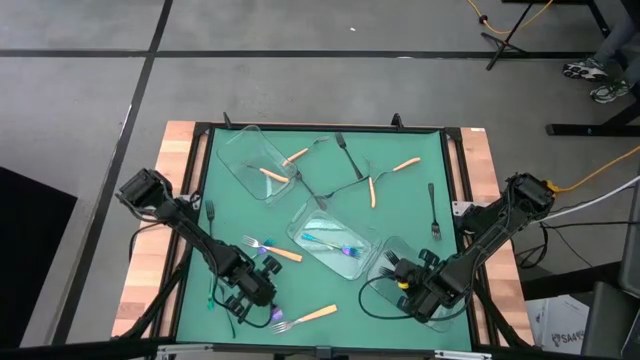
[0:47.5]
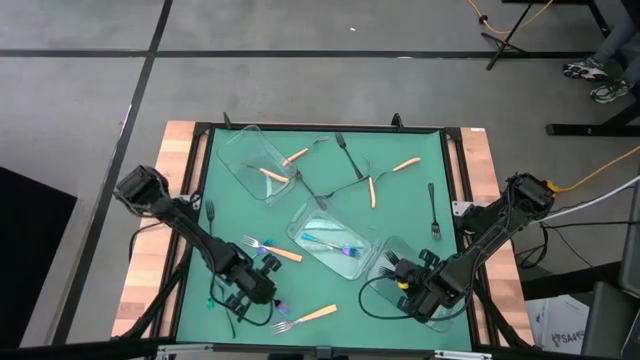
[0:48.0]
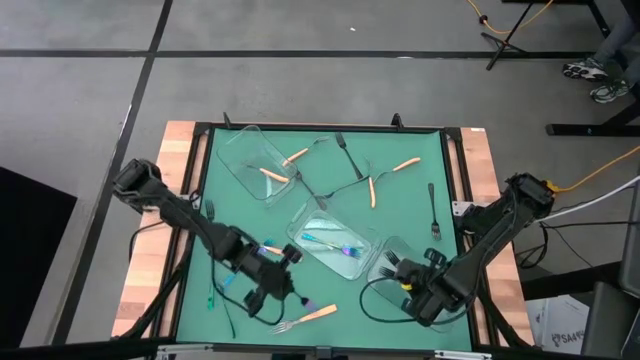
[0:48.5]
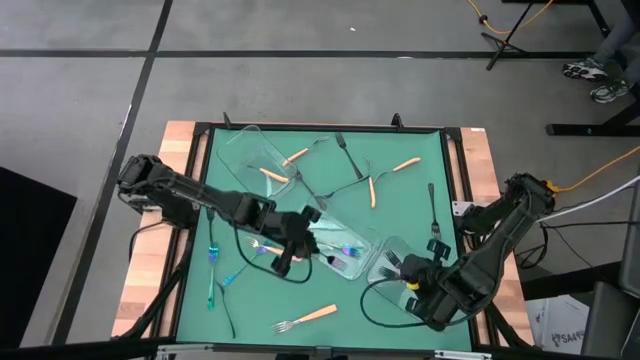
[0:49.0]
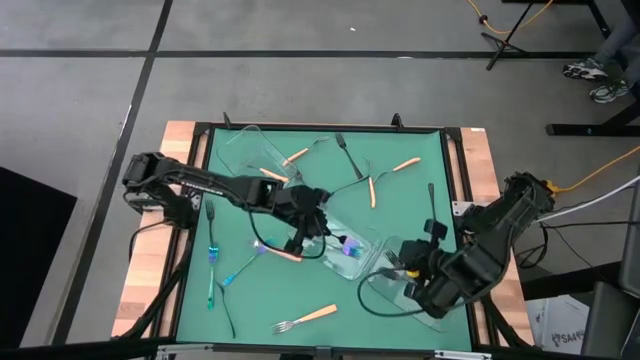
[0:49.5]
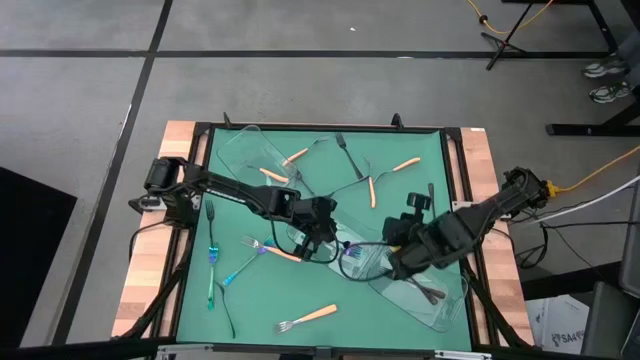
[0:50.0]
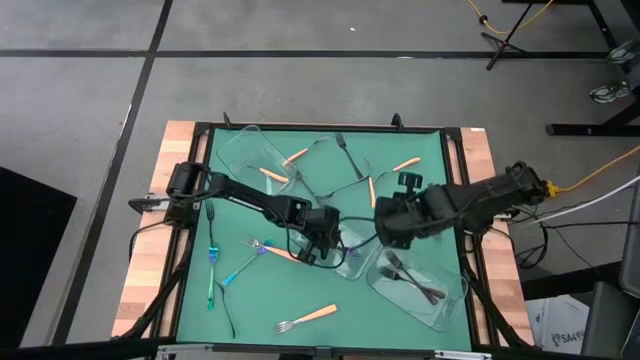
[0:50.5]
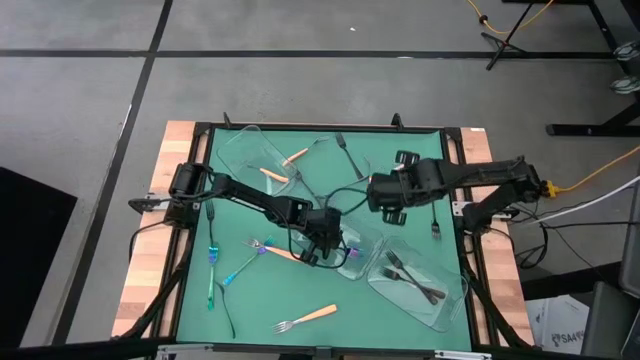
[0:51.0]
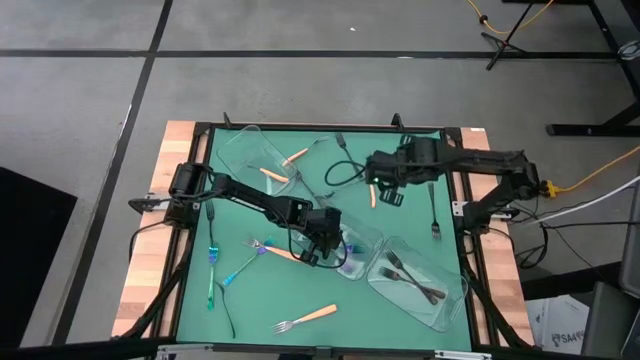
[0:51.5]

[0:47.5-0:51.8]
Task: Sort silverware by color (type)
Put the blue fork into the center transparent bin

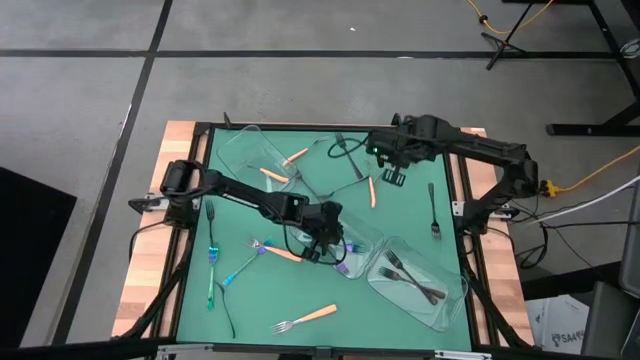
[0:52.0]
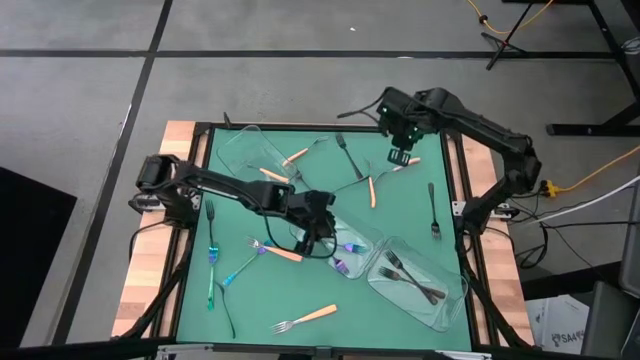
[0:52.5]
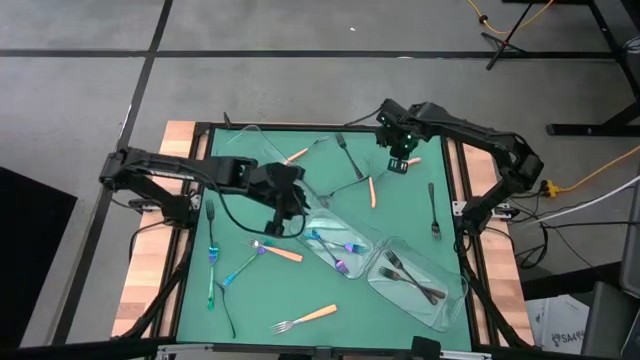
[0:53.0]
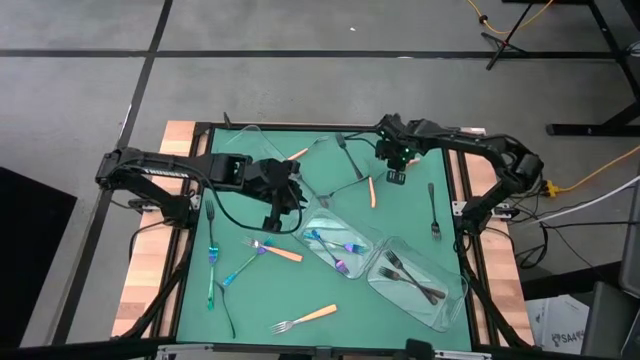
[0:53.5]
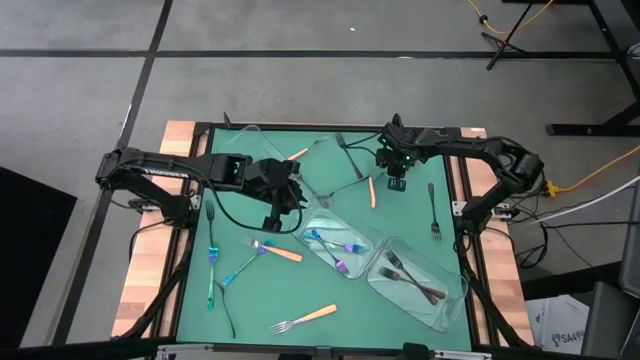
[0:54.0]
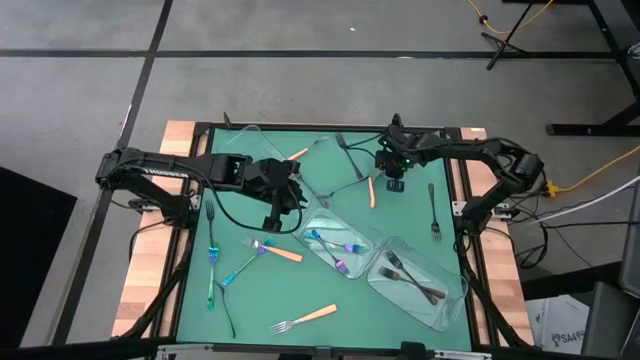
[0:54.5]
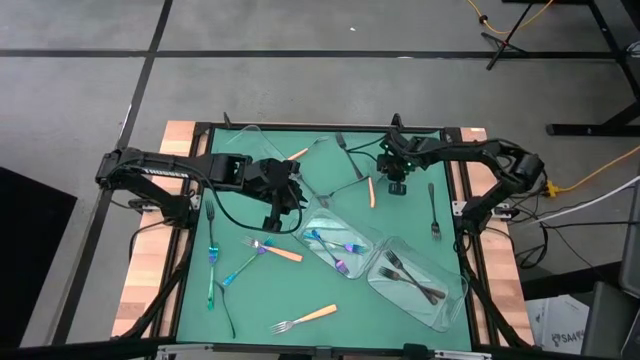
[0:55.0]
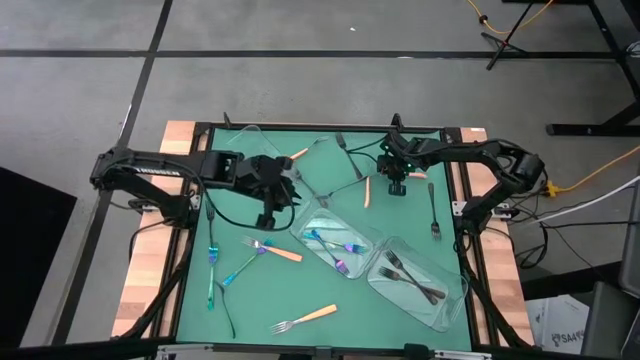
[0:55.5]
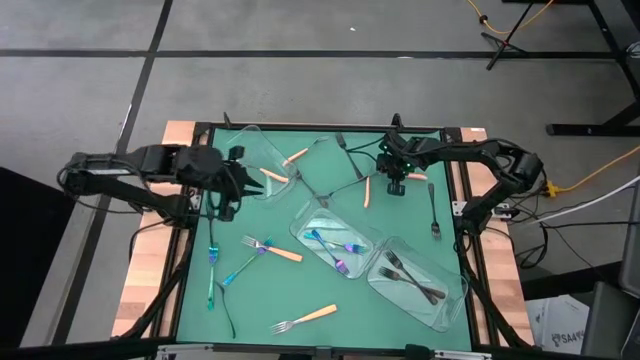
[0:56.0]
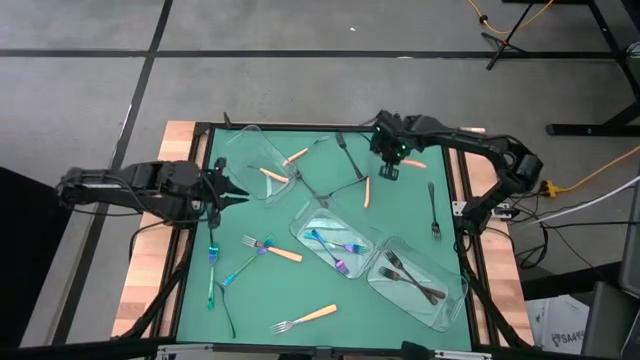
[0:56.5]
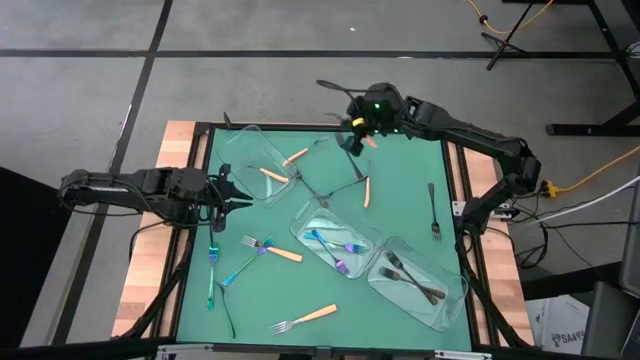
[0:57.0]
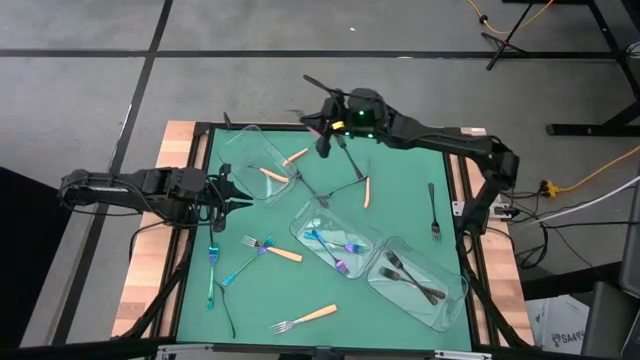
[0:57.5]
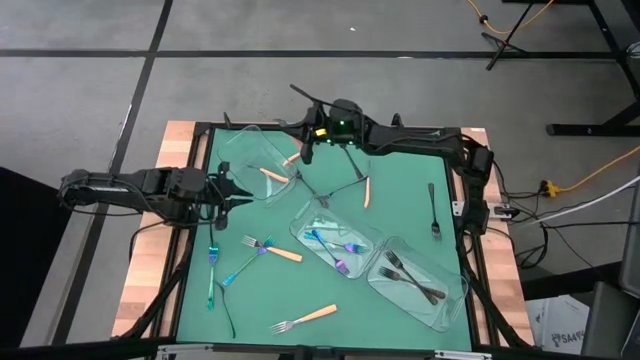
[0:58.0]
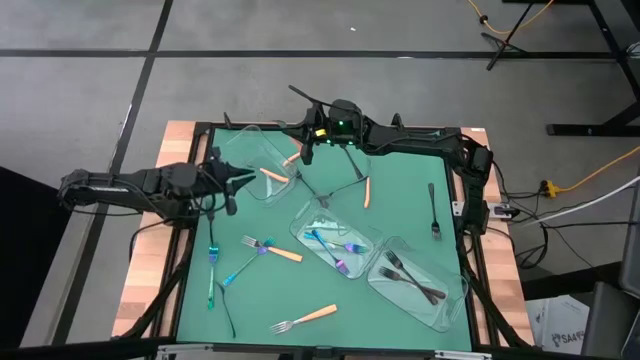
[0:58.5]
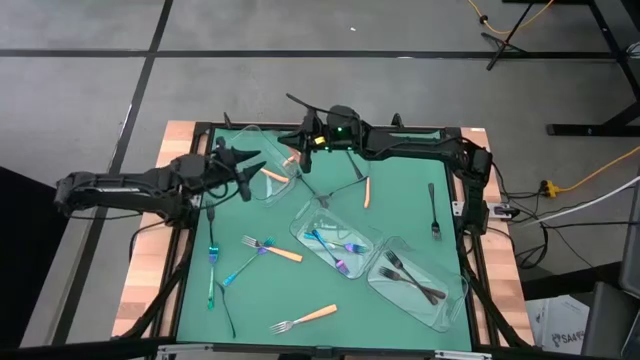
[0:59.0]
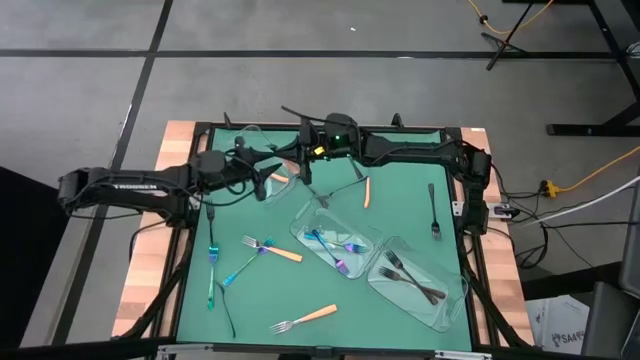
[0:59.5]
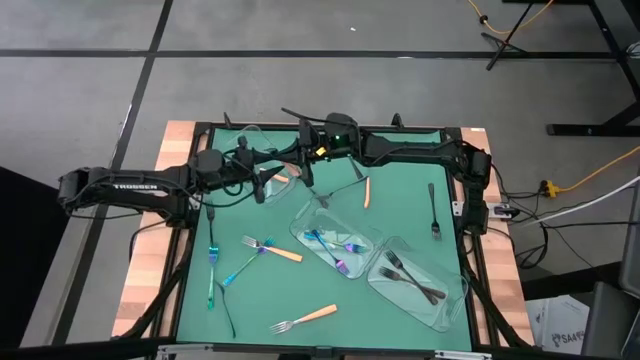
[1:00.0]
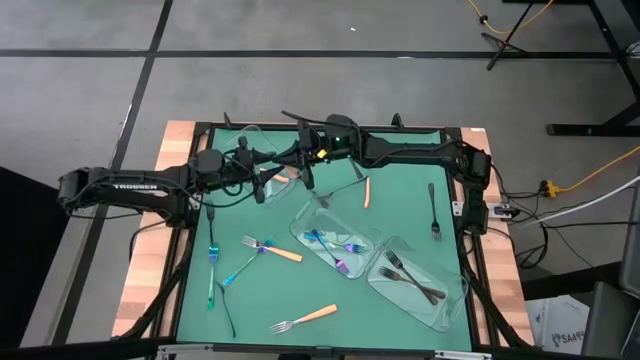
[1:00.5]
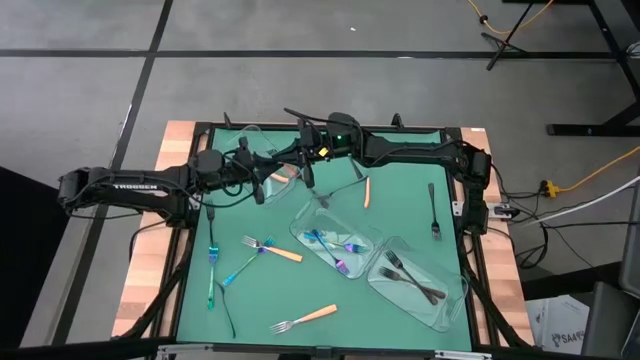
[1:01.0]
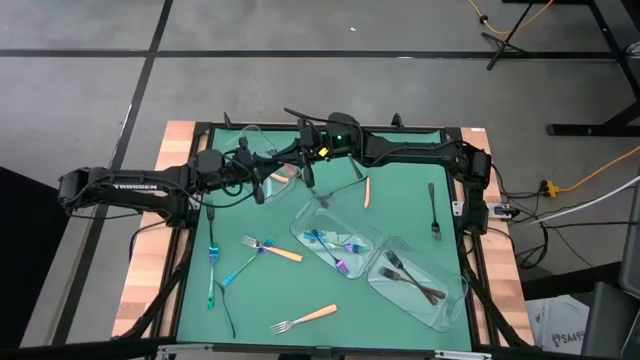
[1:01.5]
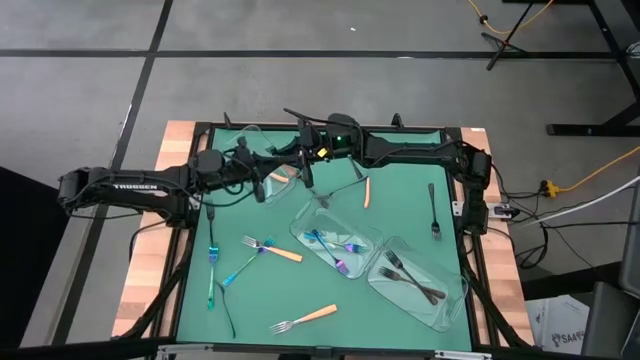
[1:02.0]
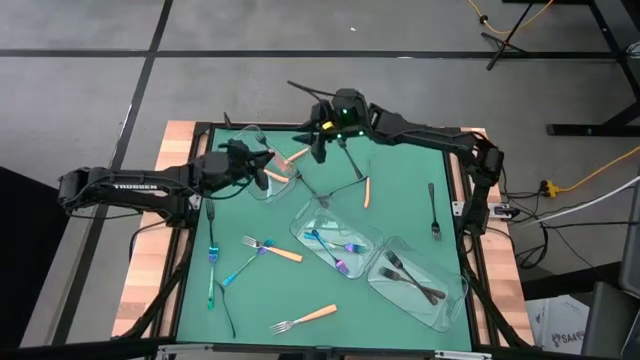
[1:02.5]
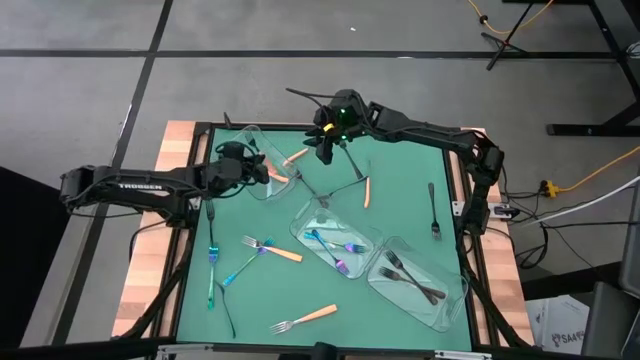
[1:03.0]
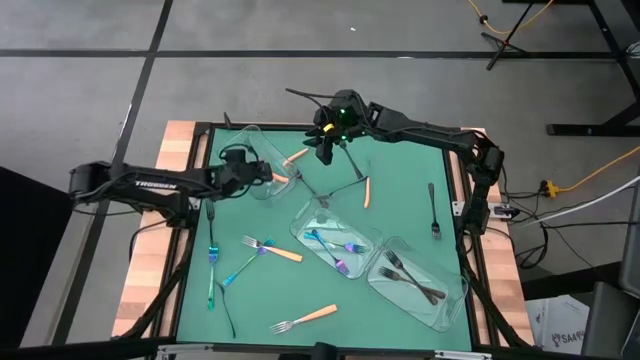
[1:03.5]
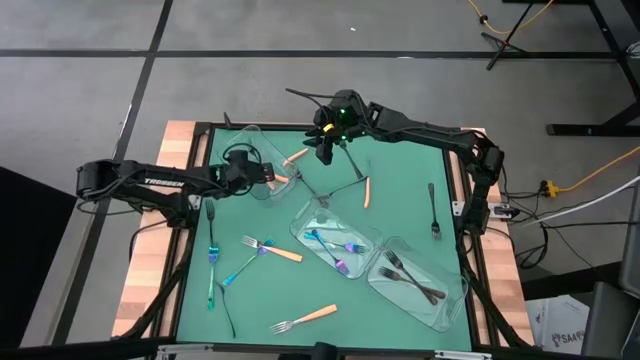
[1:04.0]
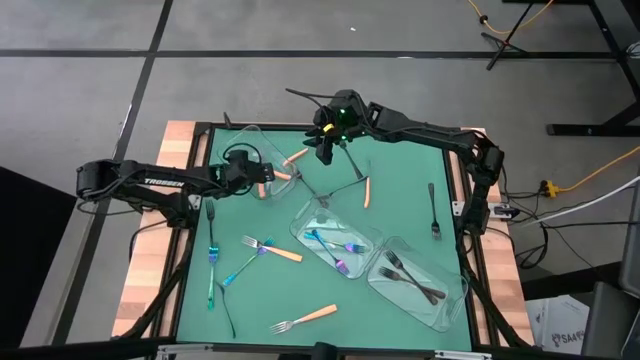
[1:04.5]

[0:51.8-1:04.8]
Put the yellow fork into the top transparent bin

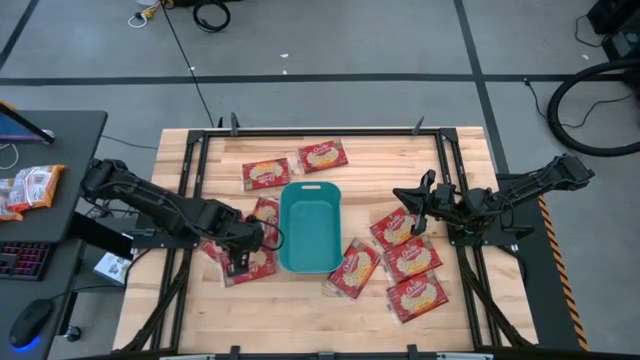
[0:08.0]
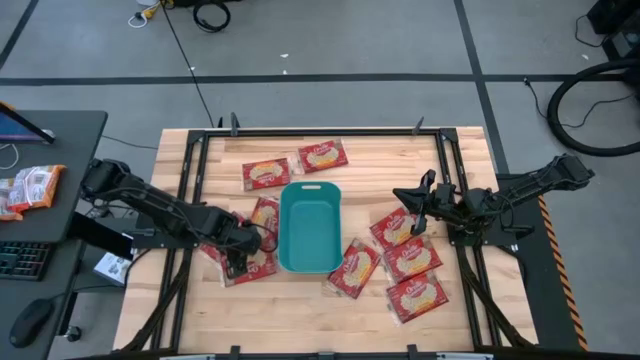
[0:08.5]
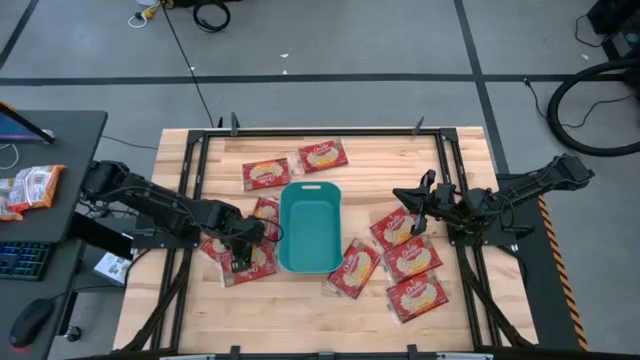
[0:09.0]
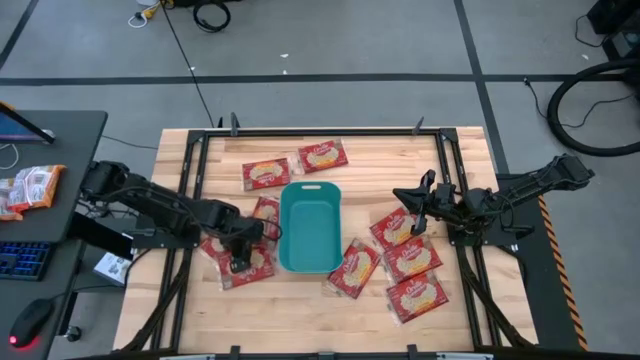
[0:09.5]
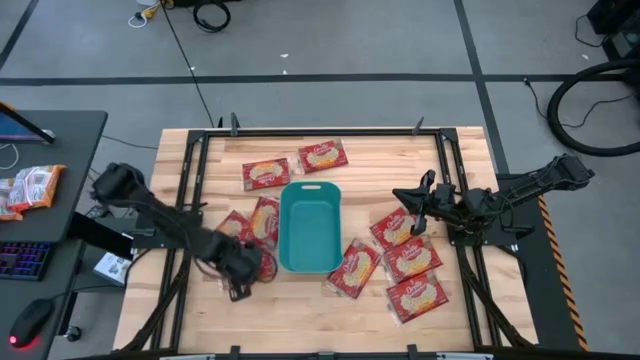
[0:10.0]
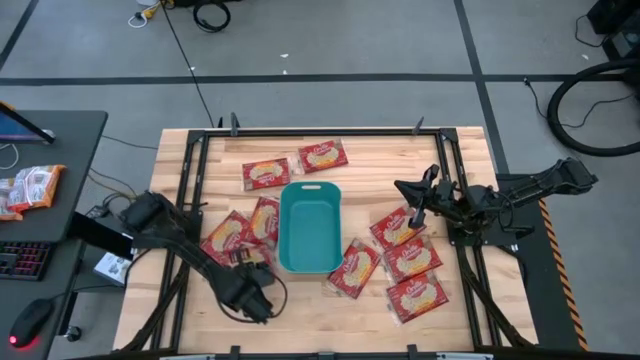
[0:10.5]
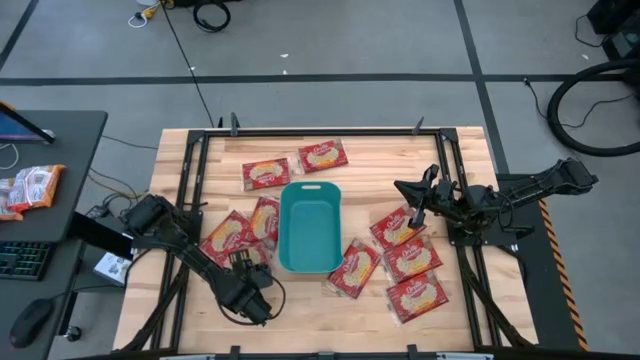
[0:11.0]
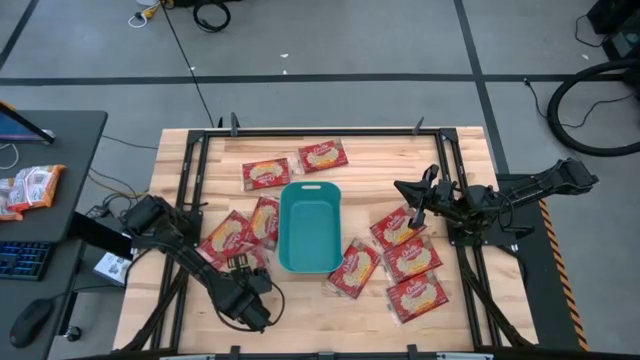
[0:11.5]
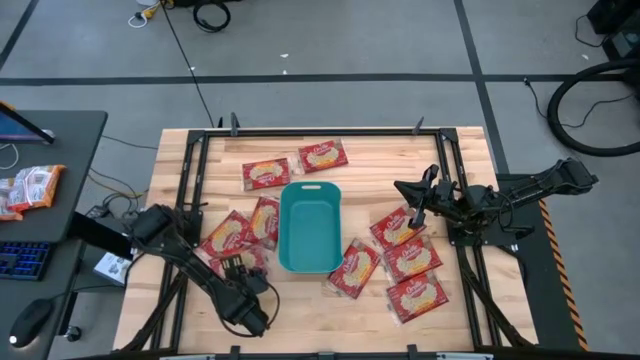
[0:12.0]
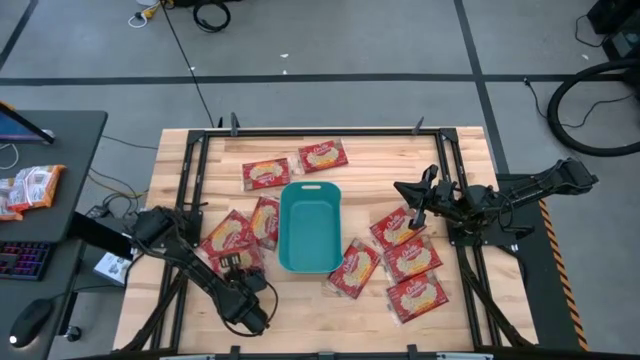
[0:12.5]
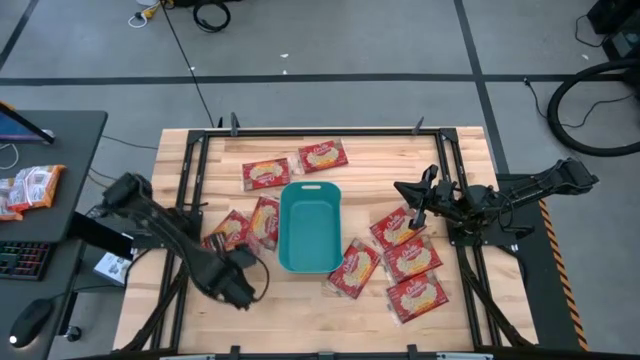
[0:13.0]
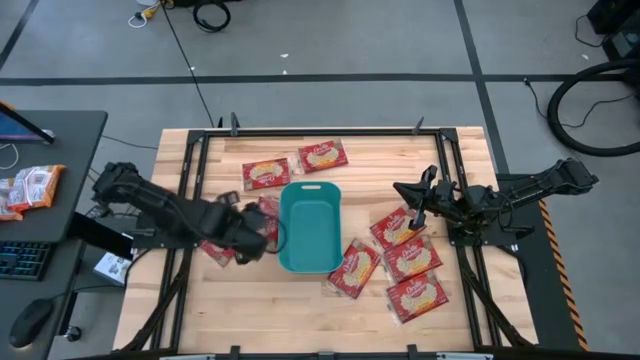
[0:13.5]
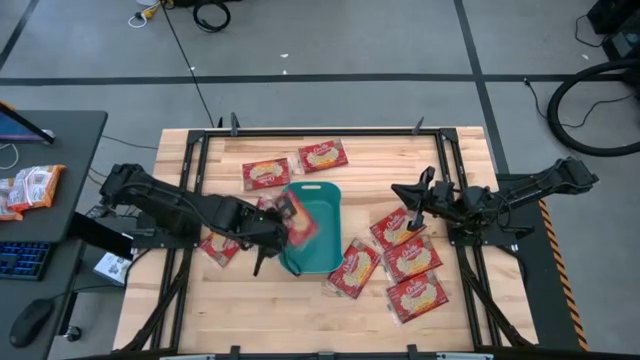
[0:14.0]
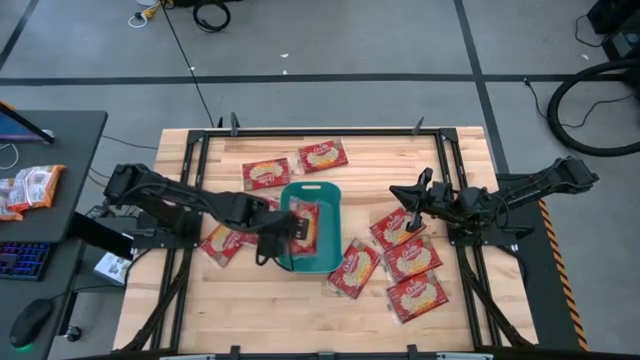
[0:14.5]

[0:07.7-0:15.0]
Task: Sort popcorn bags into baskets
Put the red popcorn bag into the green bin
